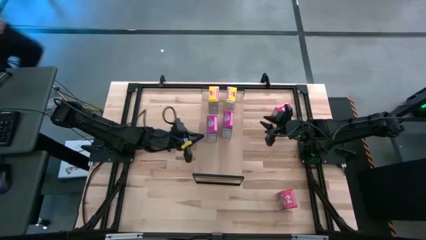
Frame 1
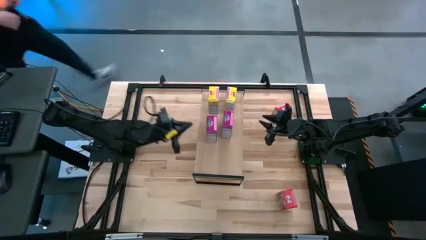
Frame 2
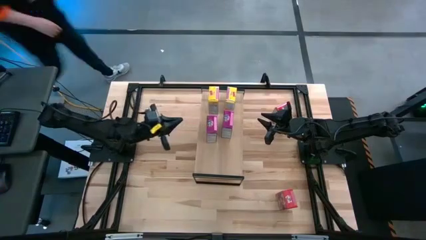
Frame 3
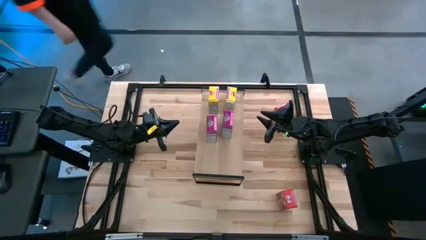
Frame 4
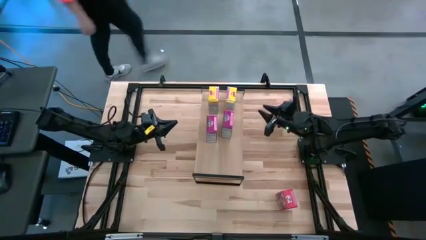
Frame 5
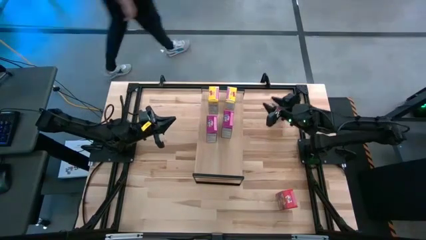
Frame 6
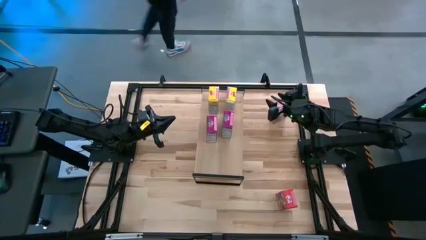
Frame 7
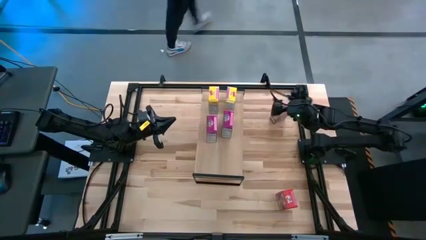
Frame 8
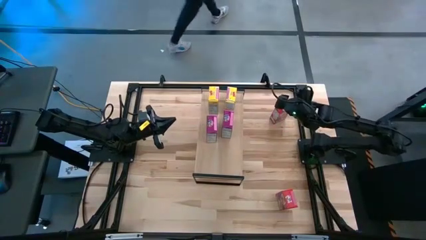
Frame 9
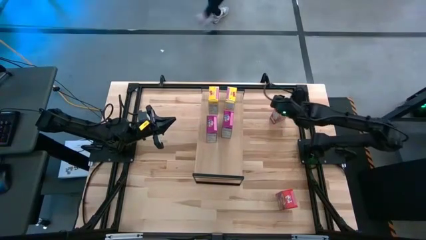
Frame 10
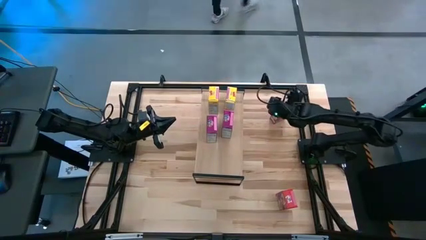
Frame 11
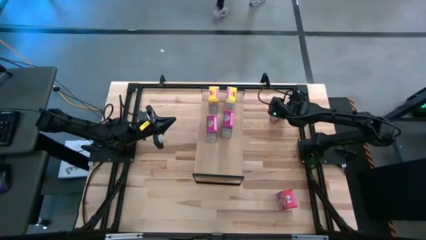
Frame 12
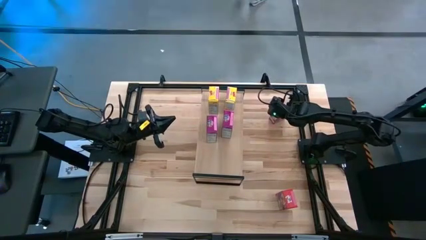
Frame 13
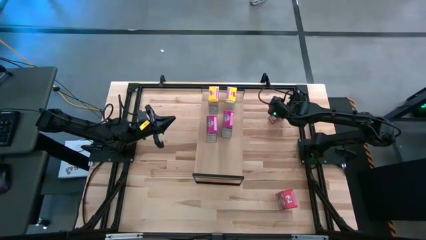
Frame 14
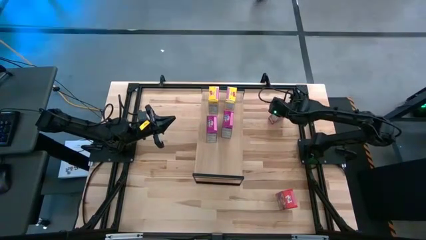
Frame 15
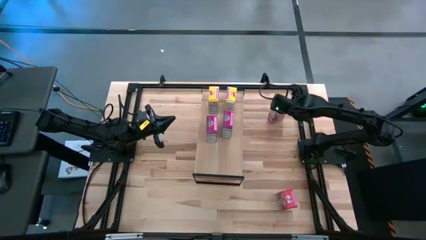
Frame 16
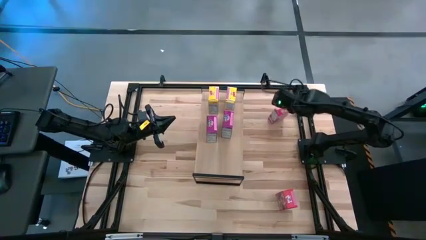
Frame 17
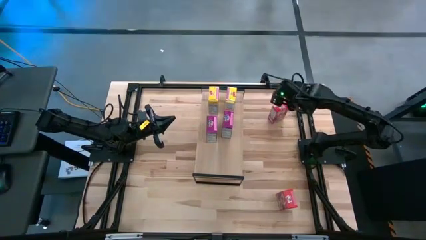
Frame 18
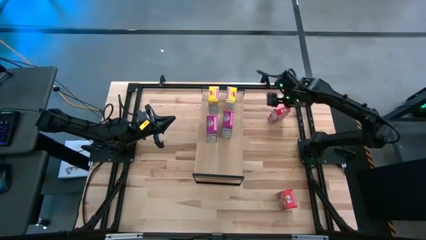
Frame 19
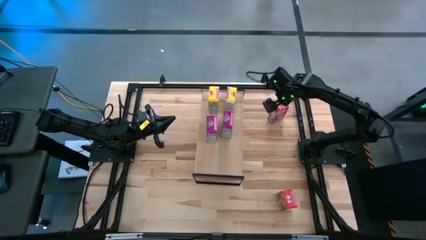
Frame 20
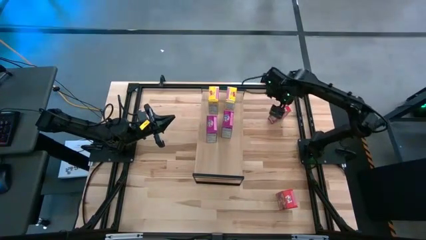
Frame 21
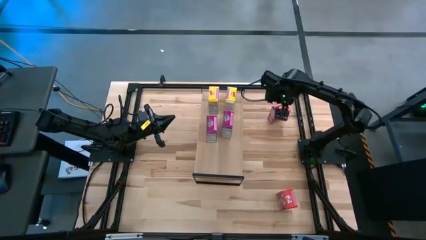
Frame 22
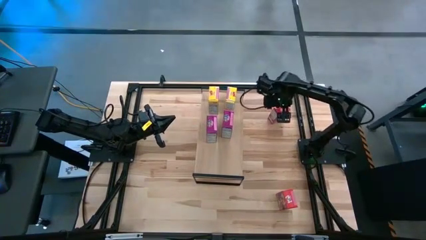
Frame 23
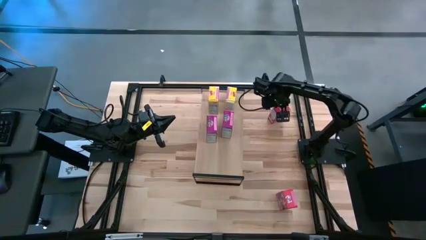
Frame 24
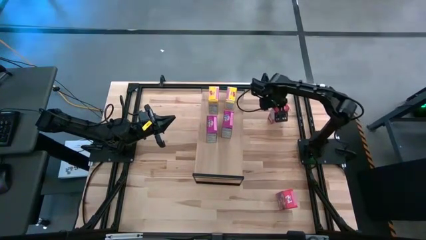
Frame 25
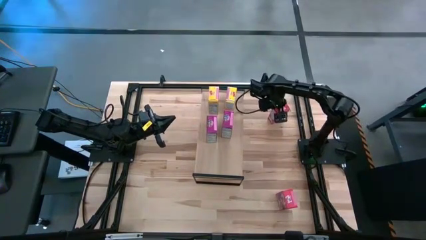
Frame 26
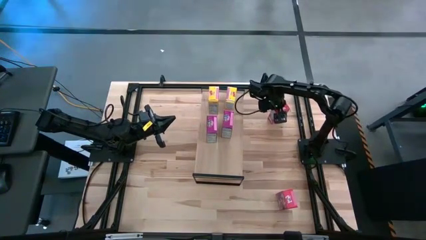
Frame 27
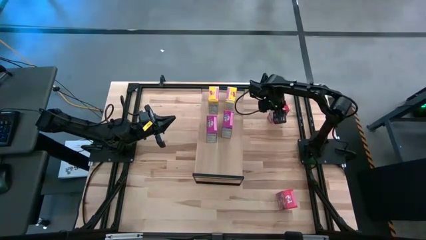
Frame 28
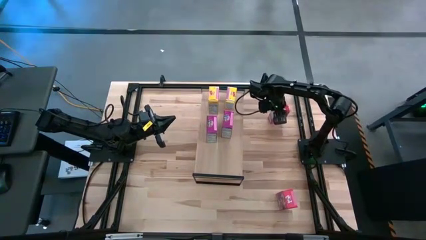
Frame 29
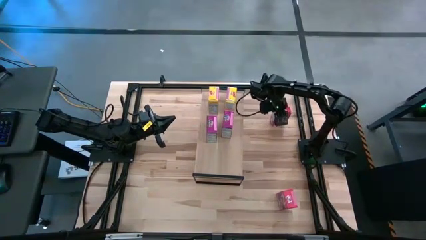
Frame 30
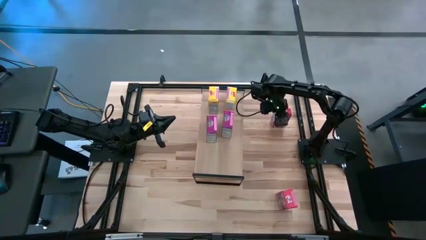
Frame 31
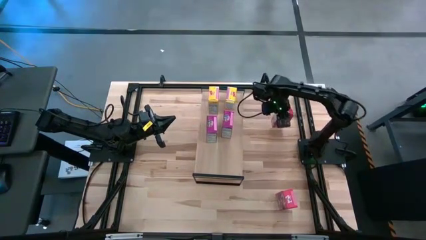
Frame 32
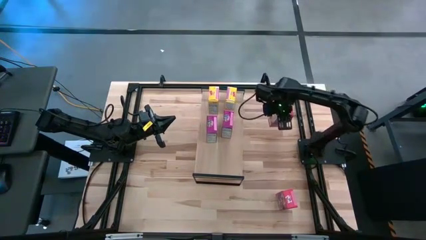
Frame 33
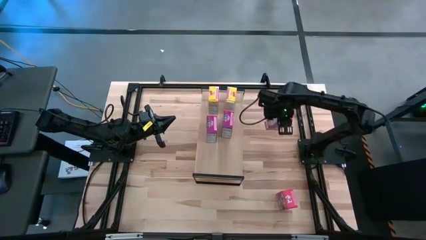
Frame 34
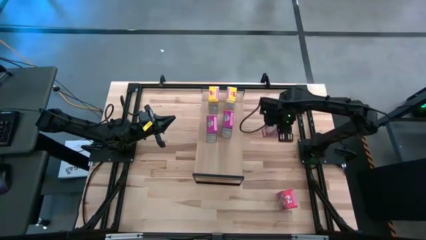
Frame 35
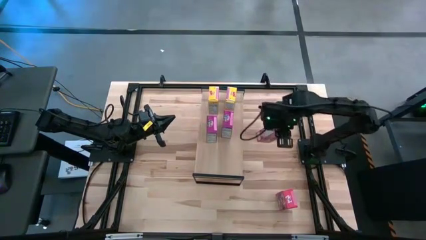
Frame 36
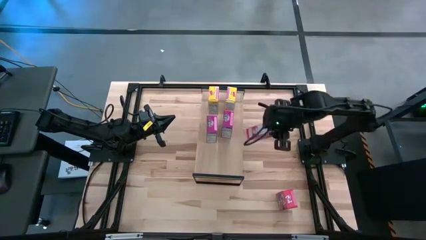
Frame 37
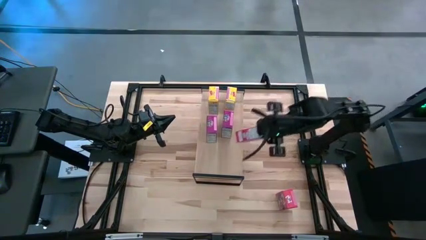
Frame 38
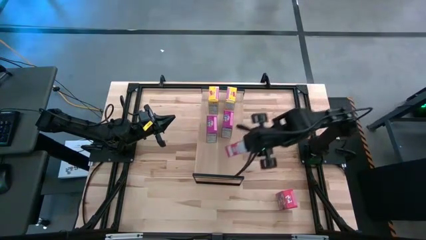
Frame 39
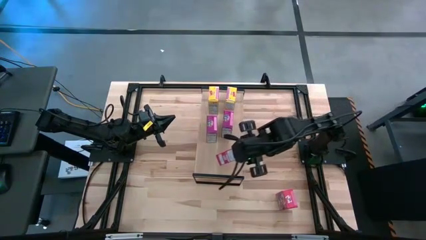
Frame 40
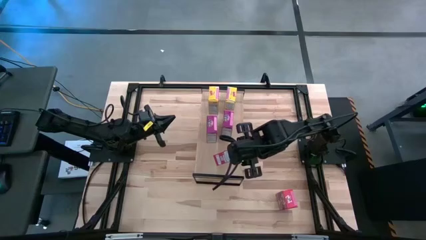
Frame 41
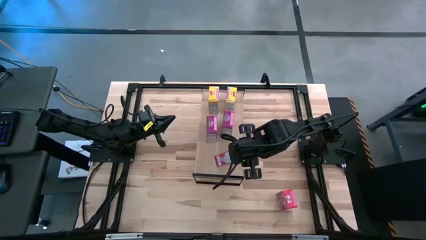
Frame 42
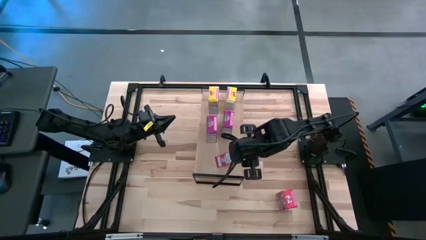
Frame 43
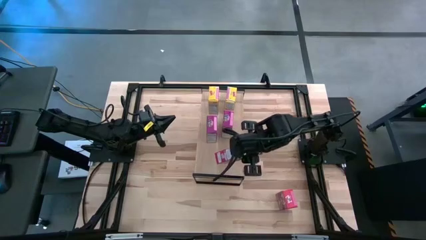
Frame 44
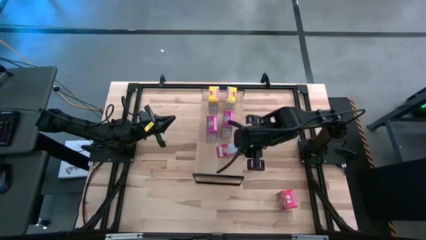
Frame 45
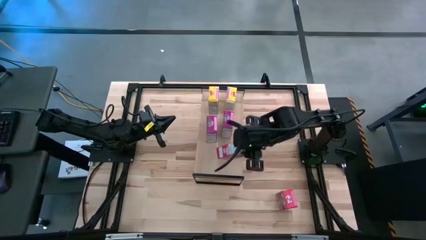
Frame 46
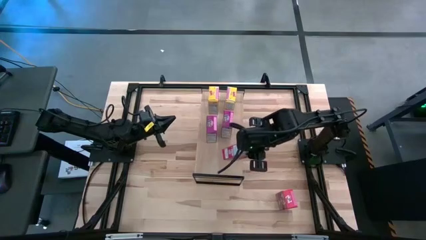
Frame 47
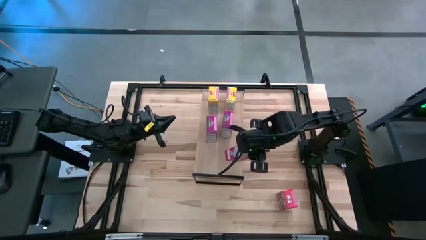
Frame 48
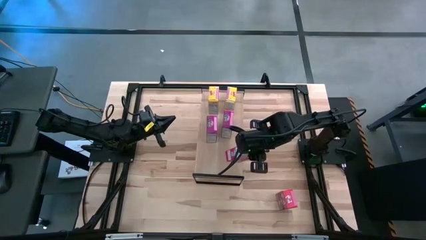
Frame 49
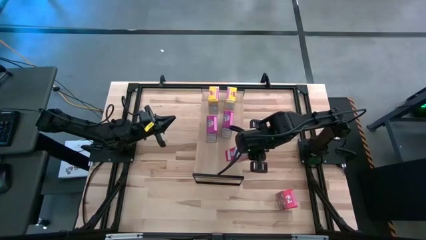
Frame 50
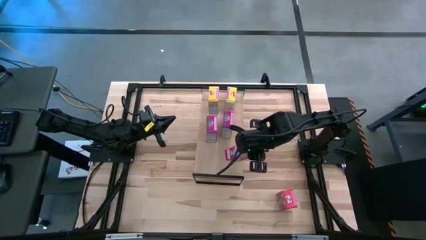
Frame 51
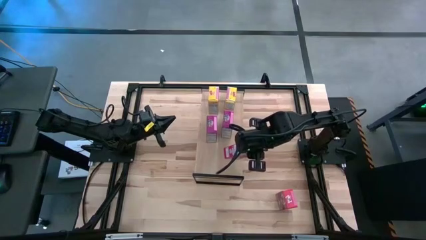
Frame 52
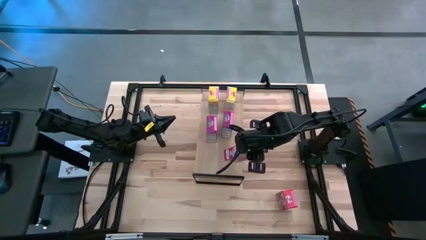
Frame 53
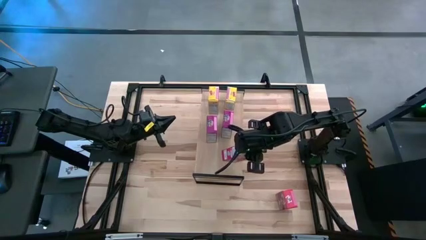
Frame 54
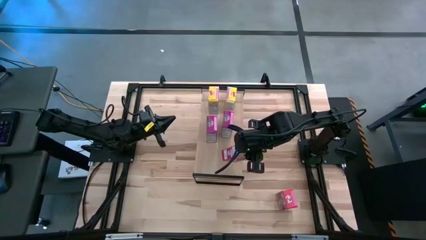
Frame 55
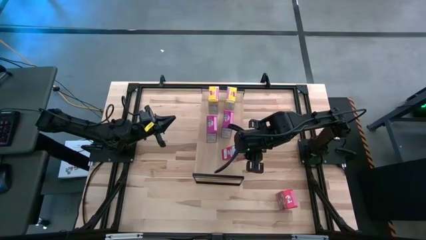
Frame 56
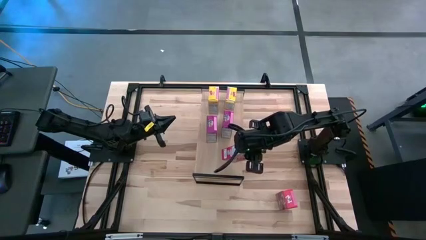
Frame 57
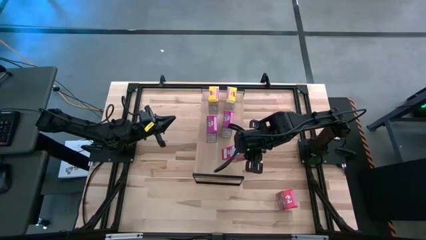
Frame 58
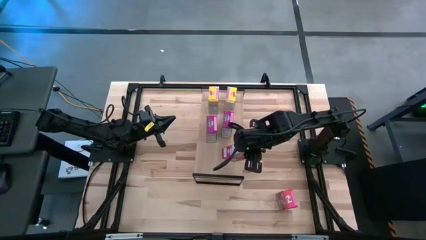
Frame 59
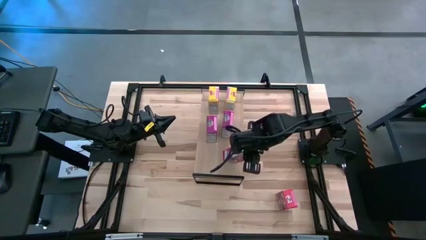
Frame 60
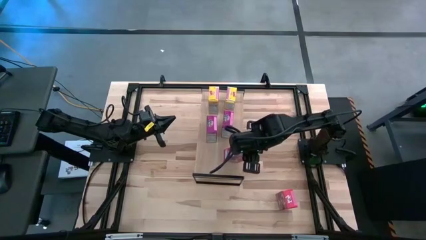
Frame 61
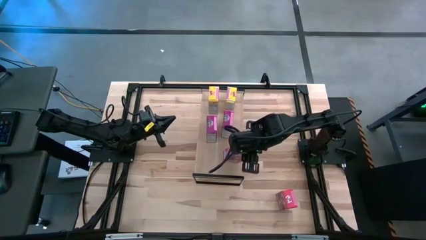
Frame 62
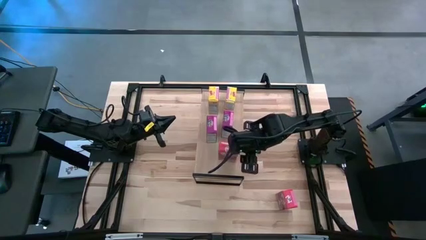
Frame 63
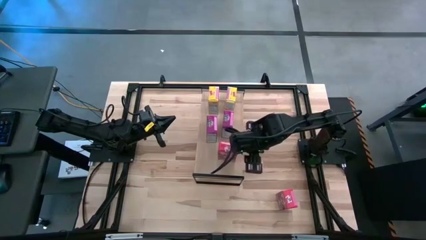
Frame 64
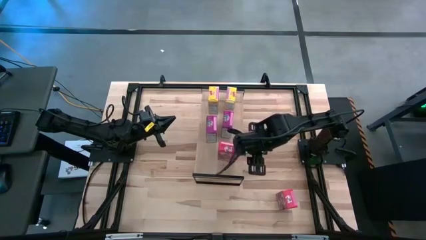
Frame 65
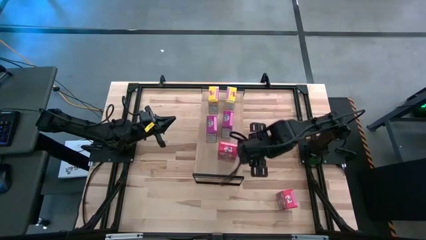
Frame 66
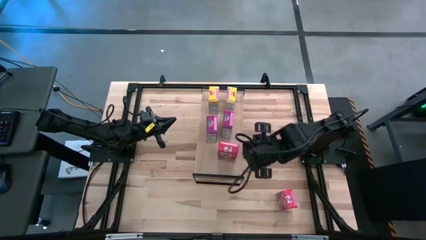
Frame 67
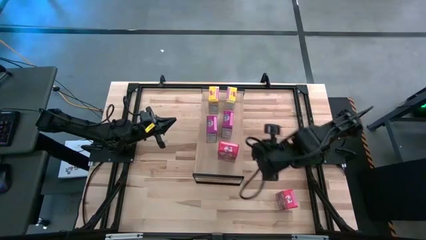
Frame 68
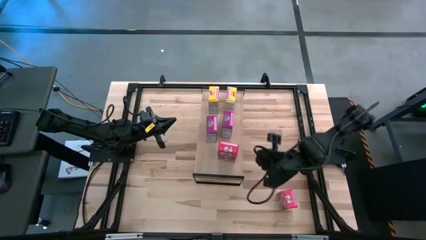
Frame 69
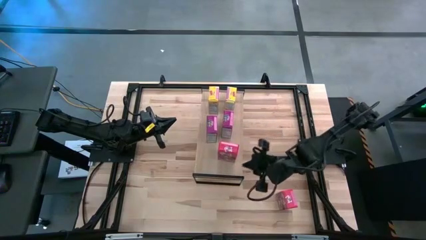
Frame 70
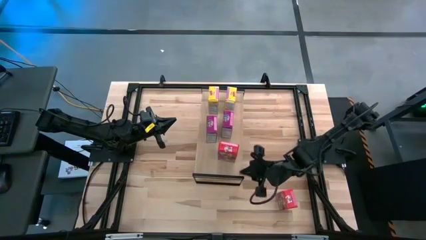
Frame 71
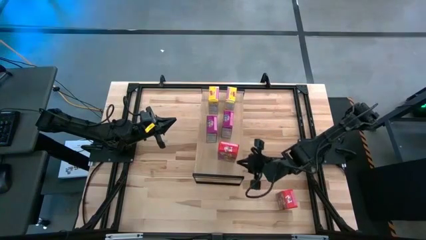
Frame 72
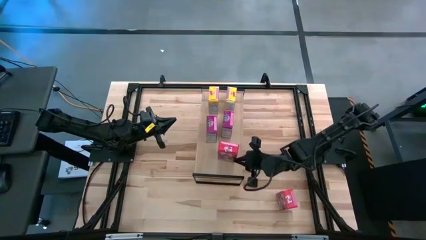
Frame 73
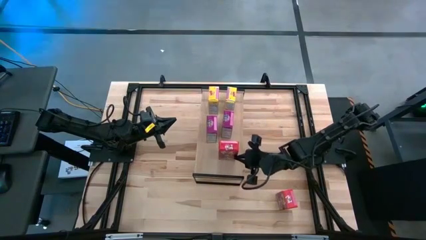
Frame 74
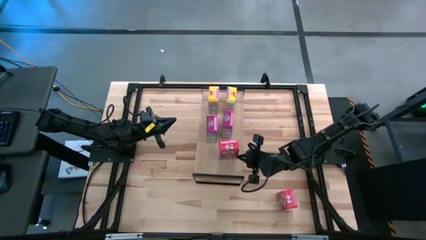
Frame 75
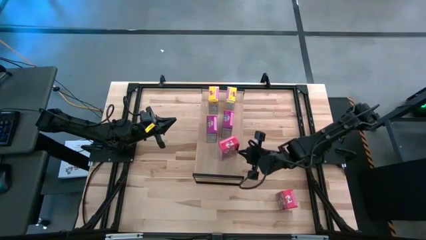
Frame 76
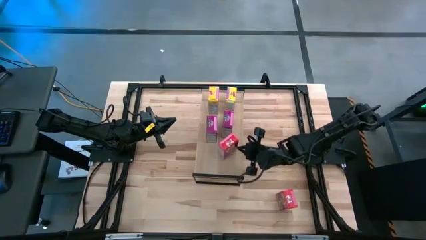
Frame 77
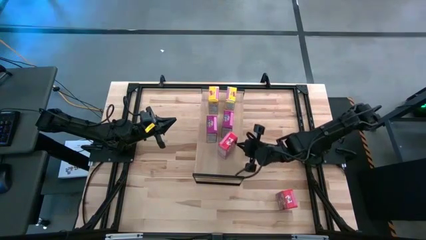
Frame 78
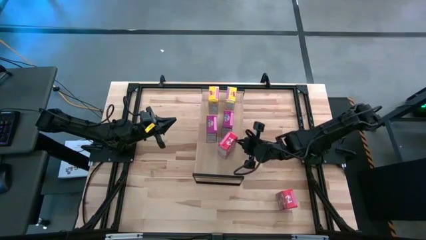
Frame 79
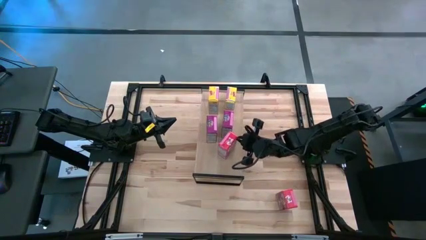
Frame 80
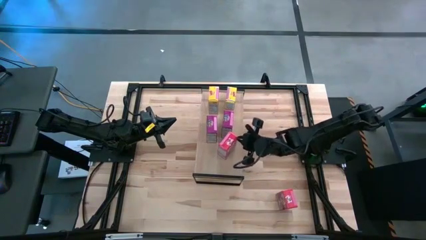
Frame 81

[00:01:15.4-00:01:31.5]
Task: Stack cereal on shelf
Put the top red cereal box on the shelf

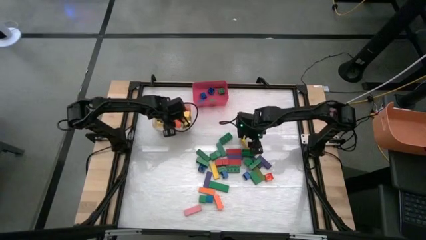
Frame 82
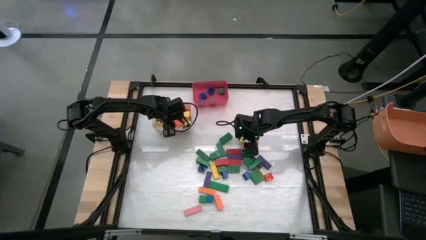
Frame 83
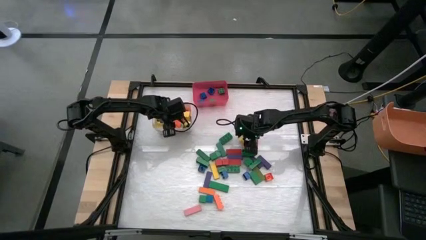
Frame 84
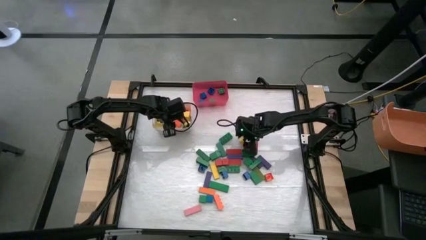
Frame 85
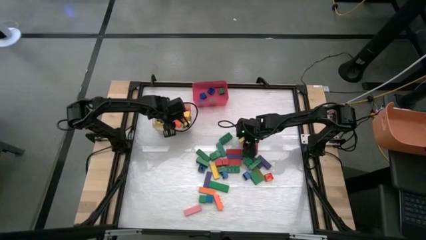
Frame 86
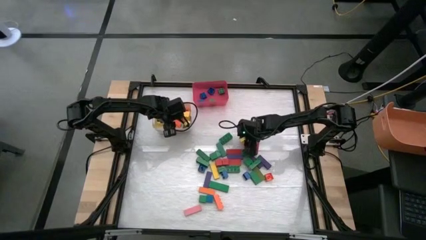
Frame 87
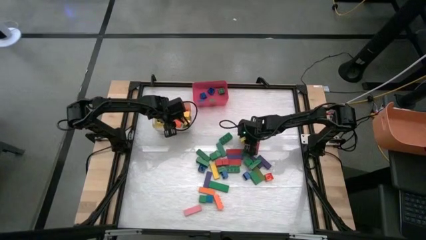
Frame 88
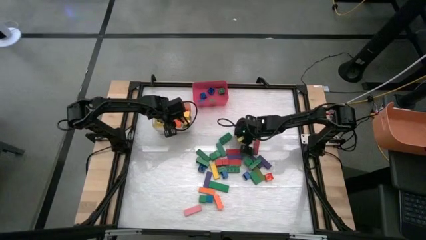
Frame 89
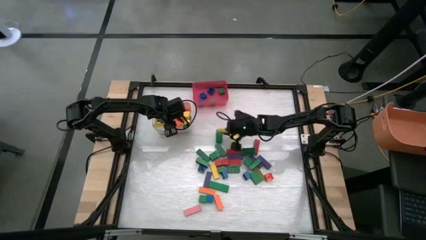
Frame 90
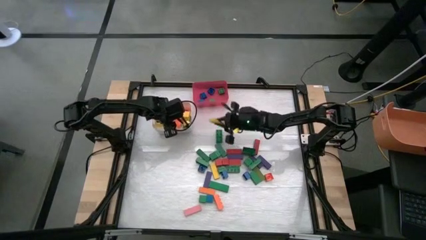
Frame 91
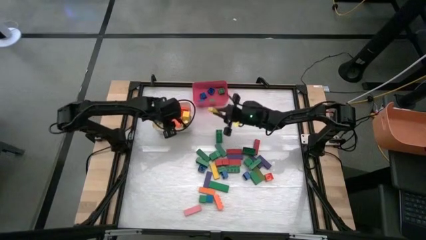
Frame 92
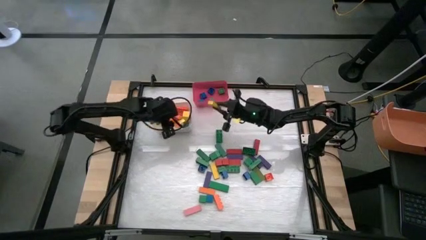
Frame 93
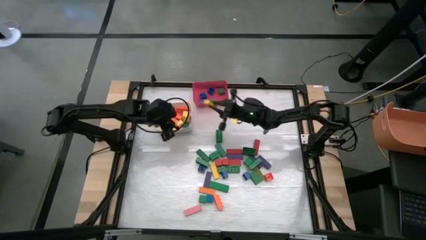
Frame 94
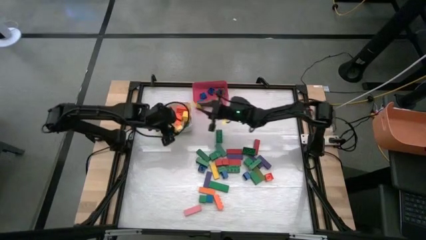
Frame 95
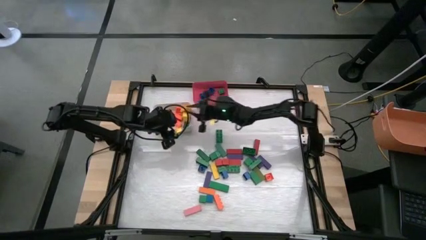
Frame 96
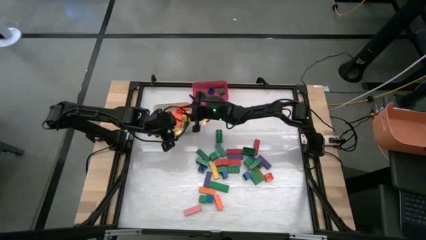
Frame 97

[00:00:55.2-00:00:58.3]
Task: Sort blocks by size
Put the large yellow wooden block into the white bin
